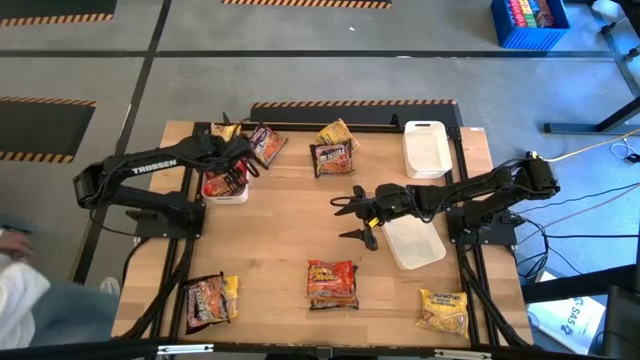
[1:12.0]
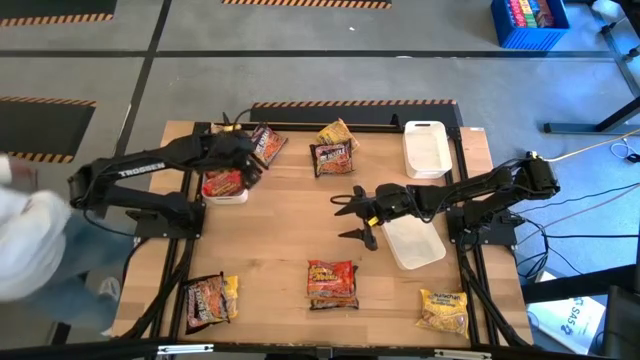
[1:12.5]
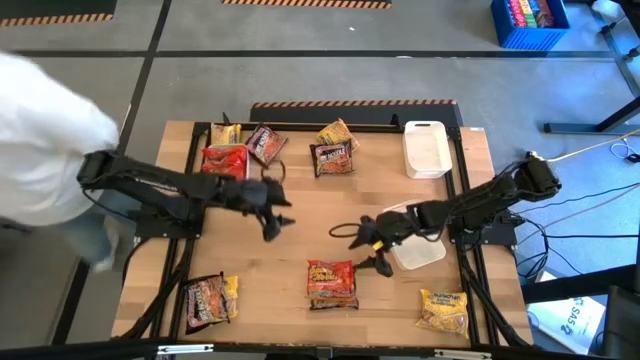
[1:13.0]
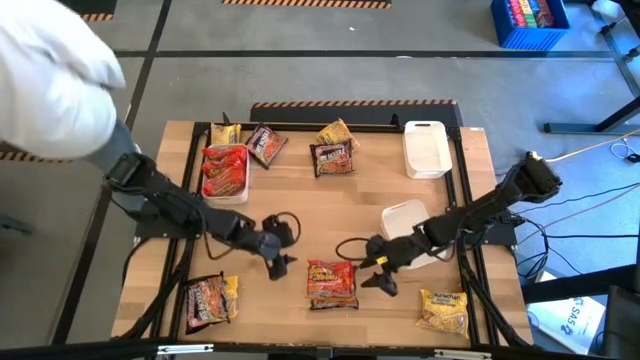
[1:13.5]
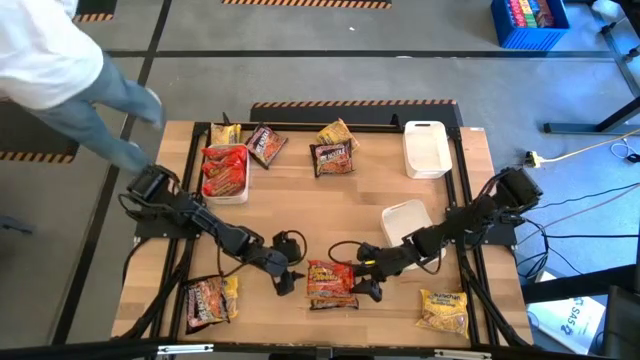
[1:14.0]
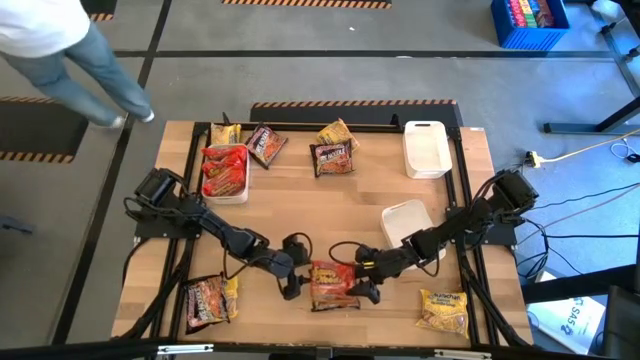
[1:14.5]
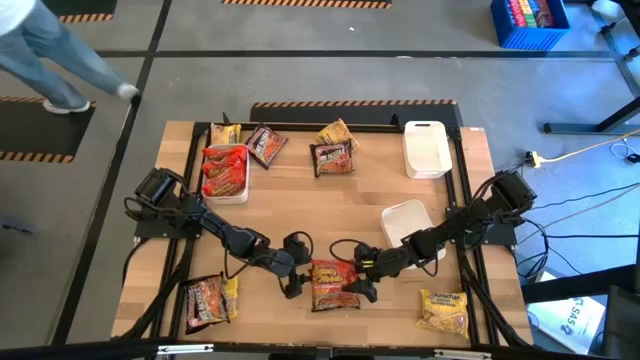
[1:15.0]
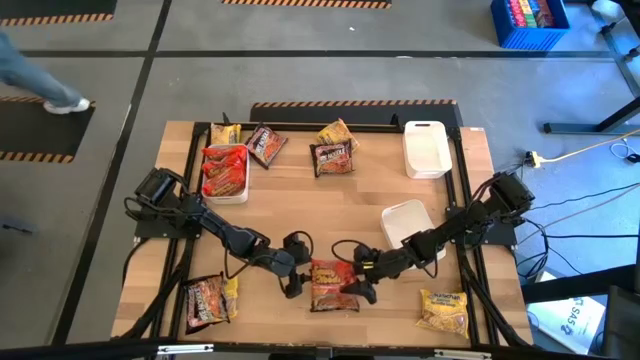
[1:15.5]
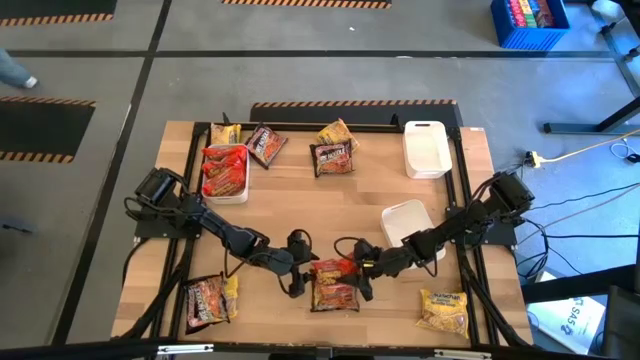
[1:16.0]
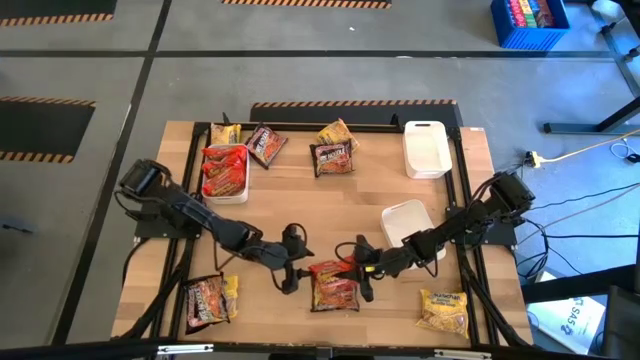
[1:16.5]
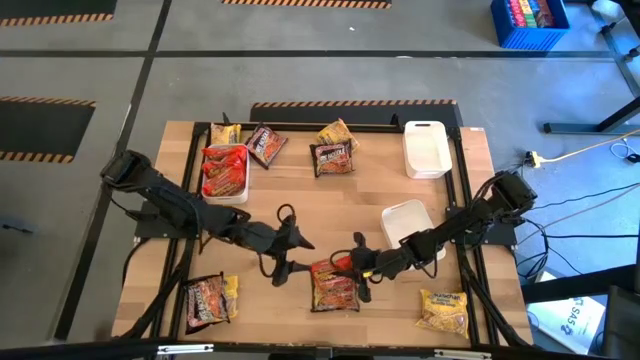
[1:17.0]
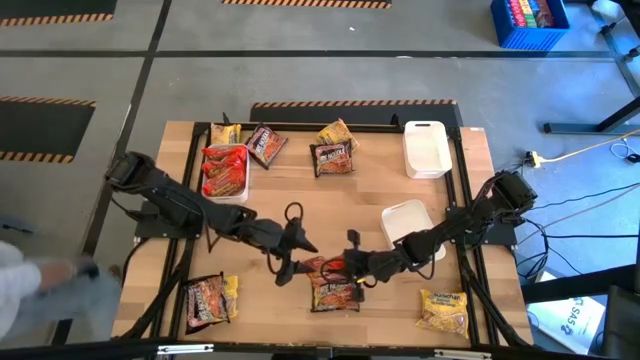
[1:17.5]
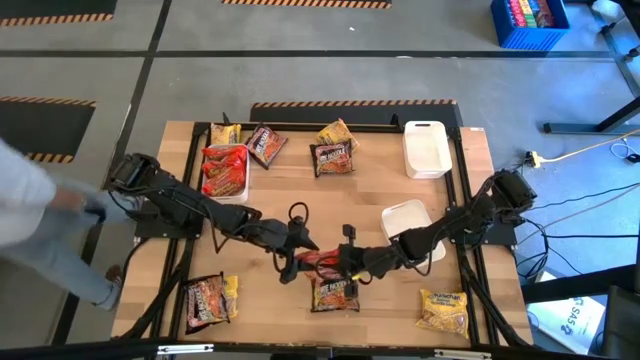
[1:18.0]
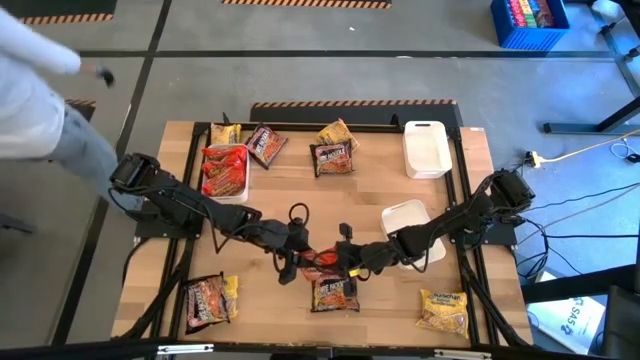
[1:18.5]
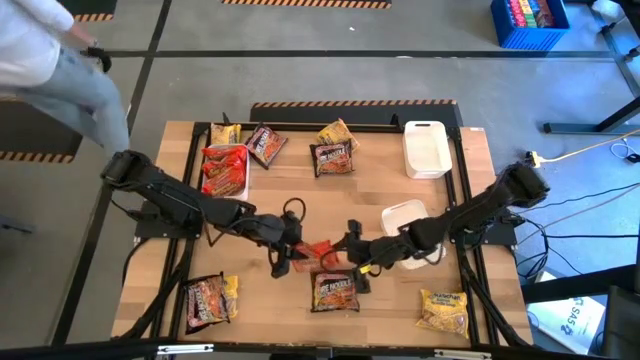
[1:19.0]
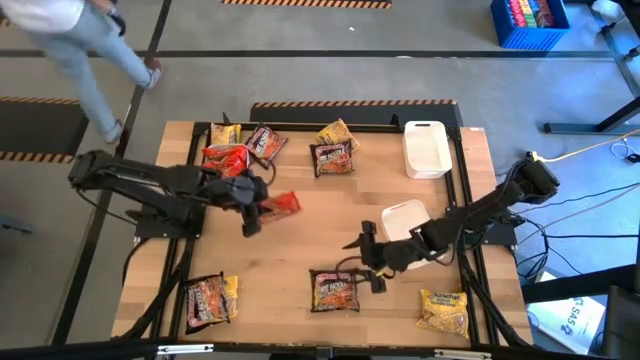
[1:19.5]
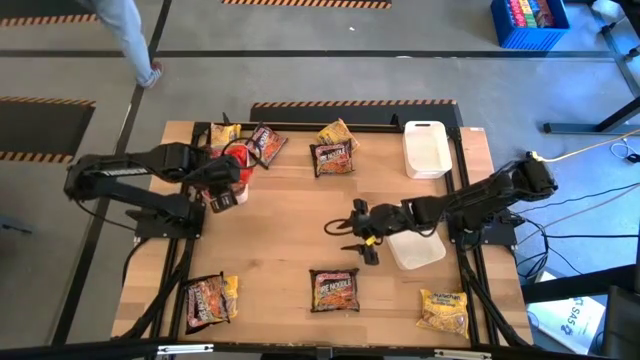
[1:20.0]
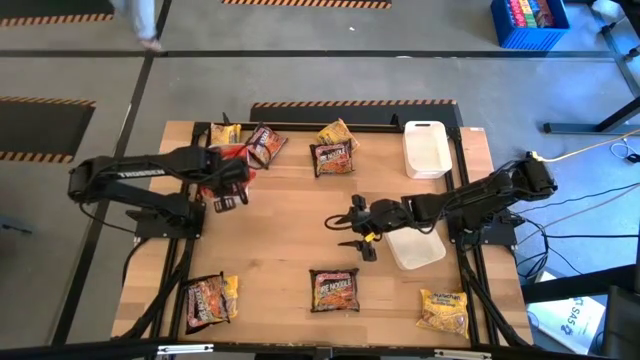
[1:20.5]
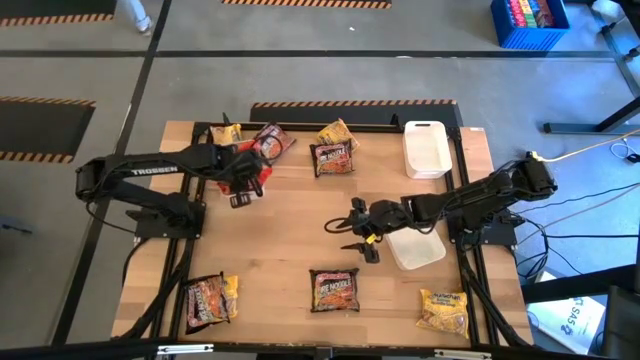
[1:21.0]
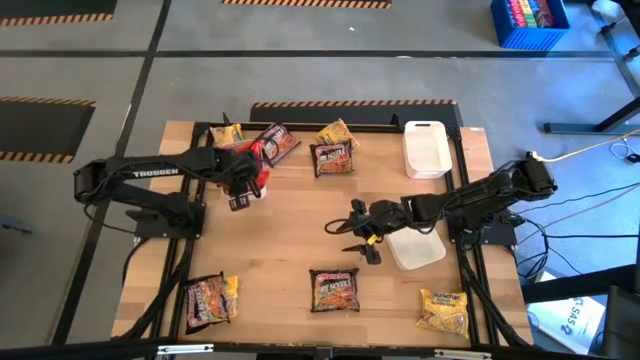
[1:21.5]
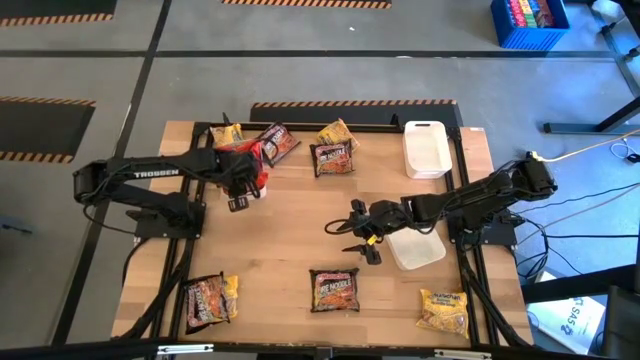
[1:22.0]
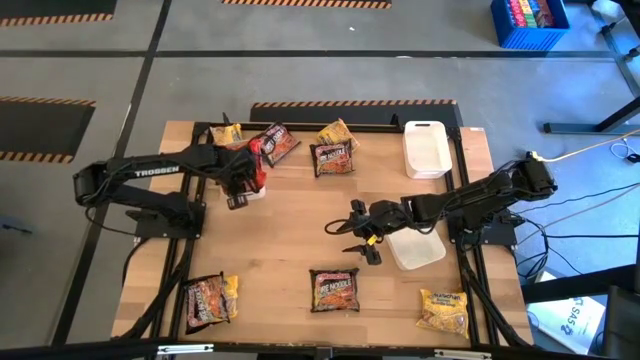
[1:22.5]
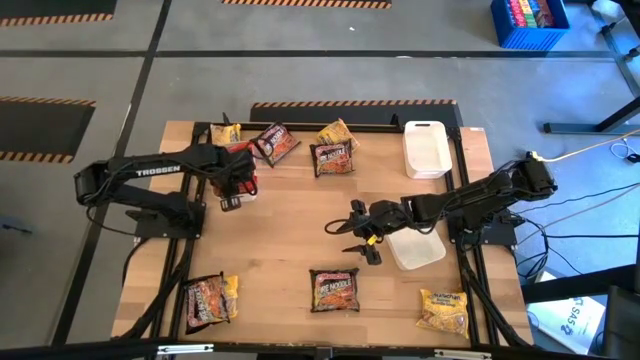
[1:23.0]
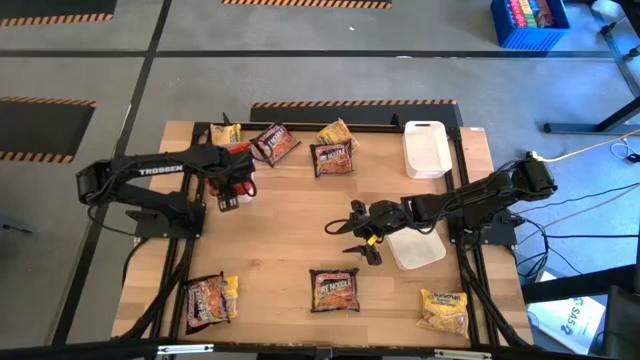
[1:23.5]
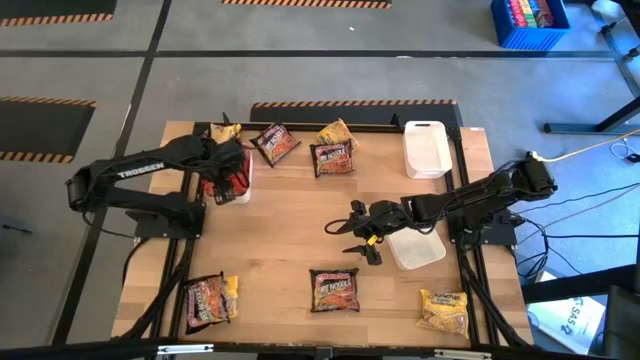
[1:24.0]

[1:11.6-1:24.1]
Task: Sort Maruchan noodles
Put the orange noodle into the left white bin

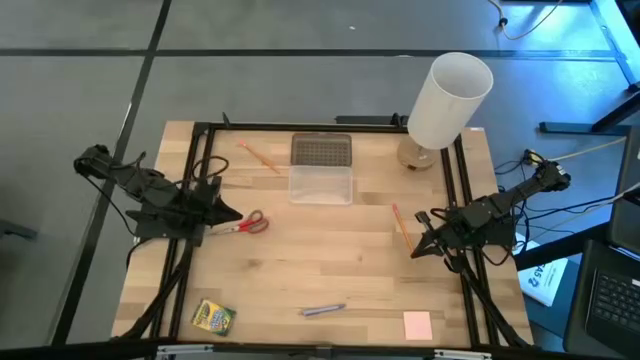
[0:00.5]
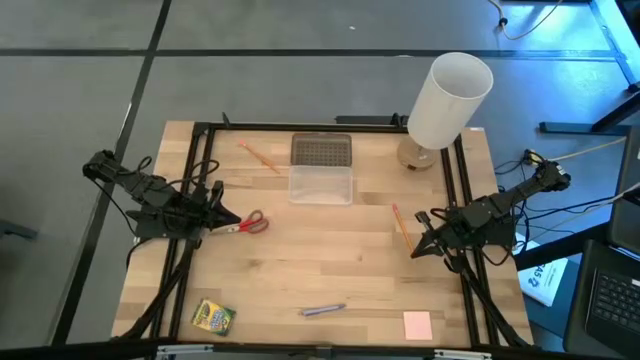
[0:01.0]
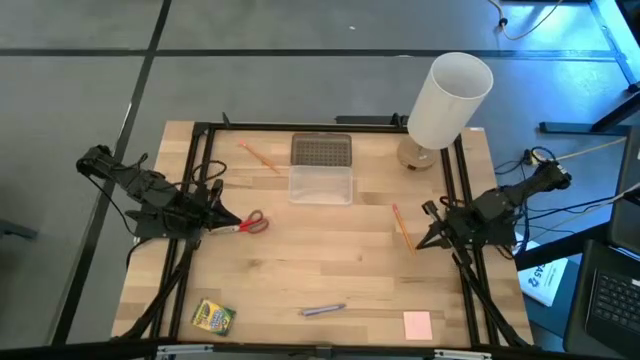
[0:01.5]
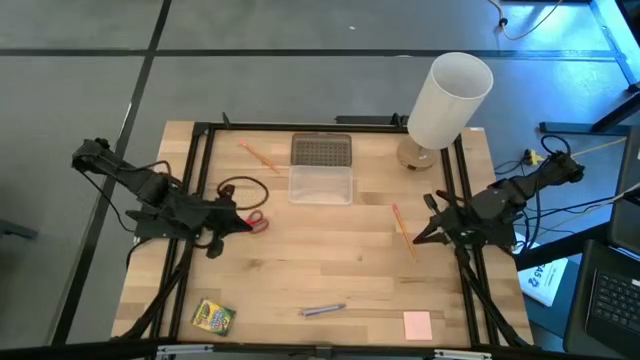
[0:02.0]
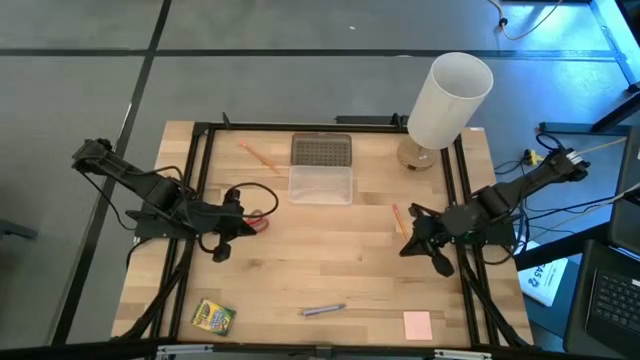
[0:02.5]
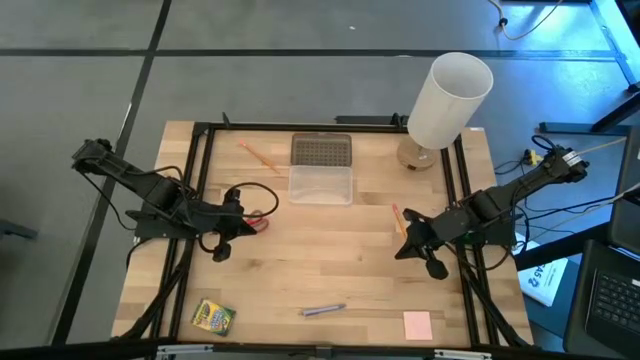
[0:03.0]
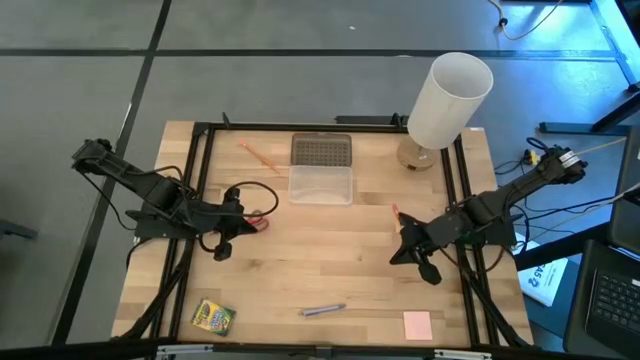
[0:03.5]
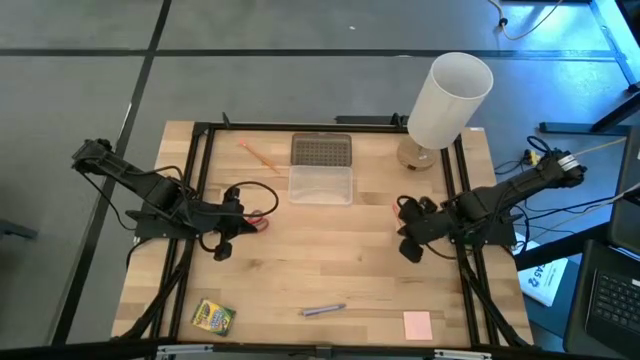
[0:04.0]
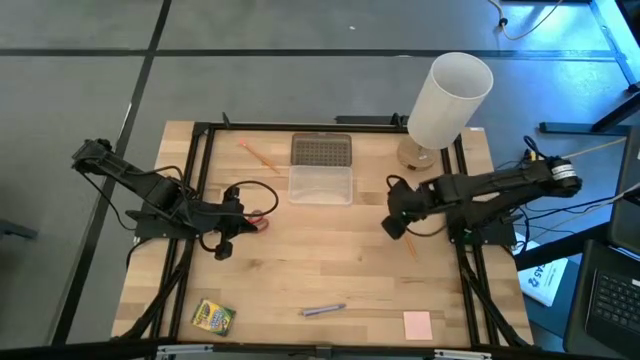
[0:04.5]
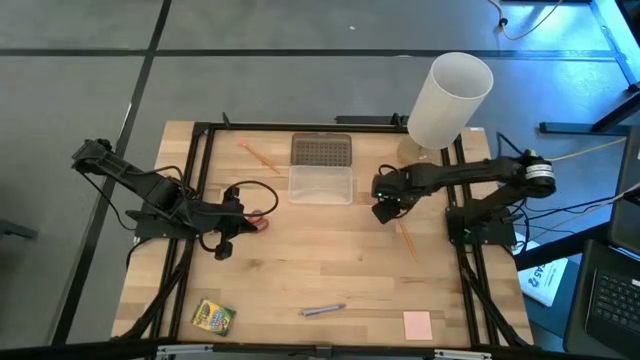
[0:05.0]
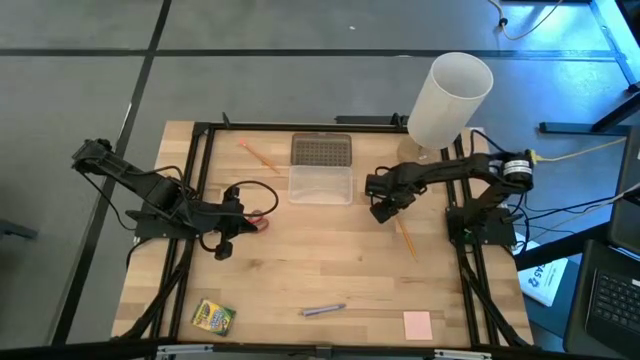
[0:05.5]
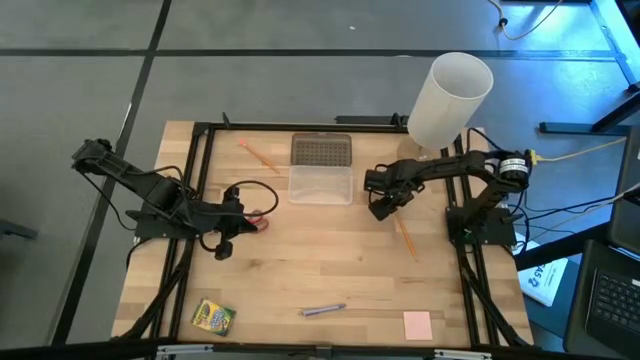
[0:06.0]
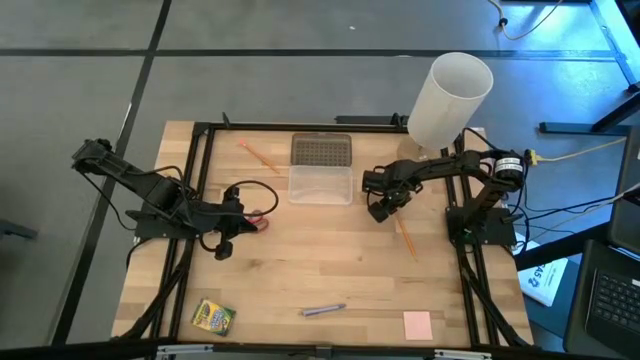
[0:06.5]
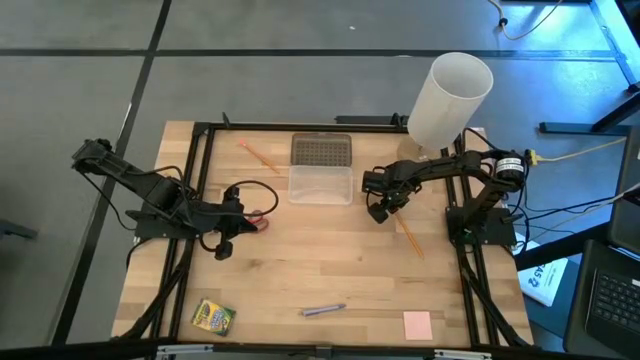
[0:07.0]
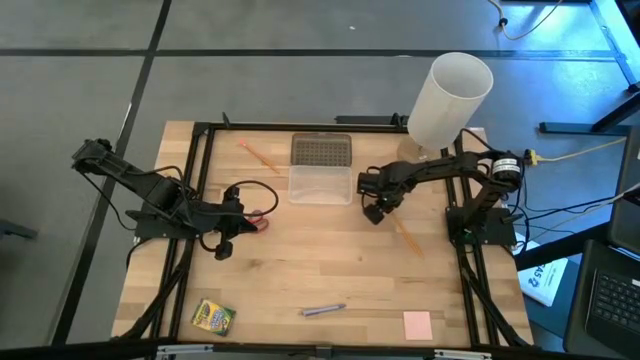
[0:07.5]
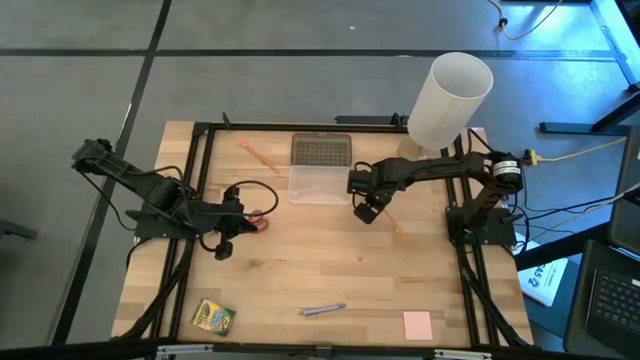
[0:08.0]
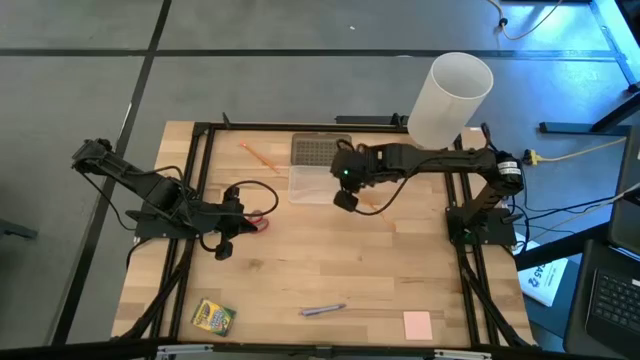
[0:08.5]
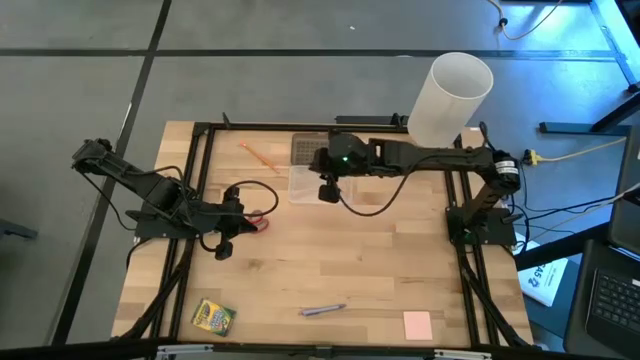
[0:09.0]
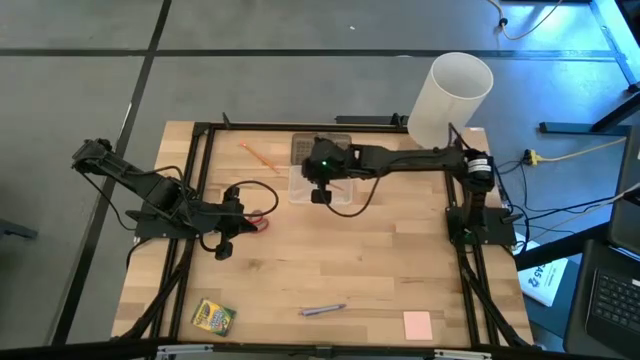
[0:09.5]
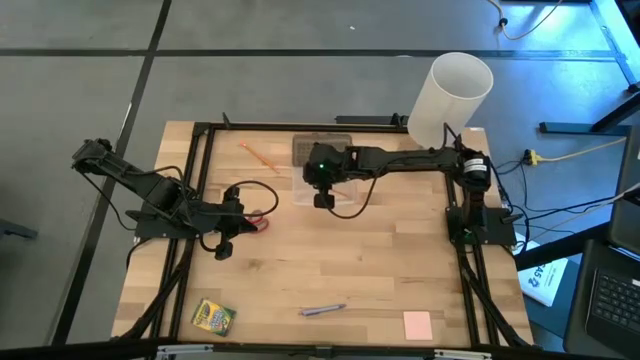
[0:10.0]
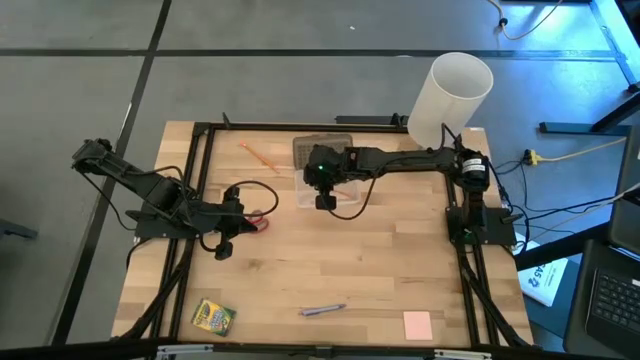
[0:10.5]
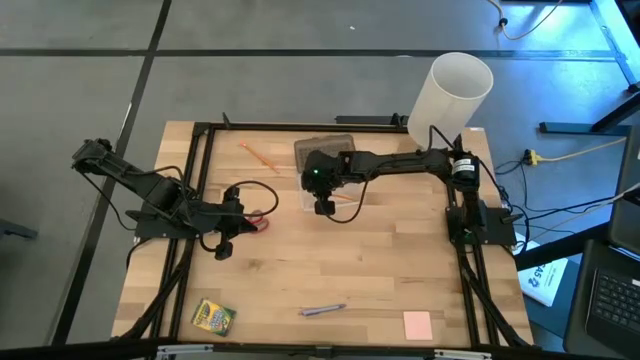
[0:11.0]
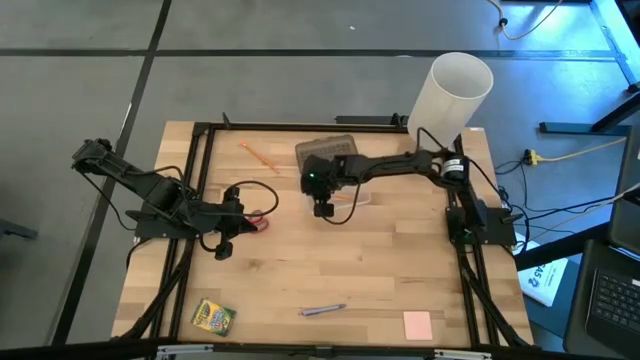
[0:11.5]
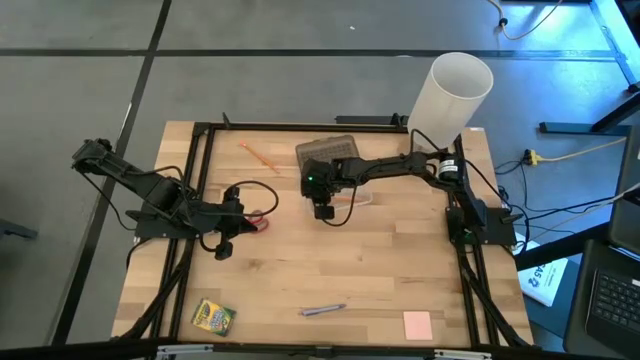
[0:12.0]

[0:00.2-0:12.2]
Task: Pack school essentials
Put the right orange pencil into the black supply box
